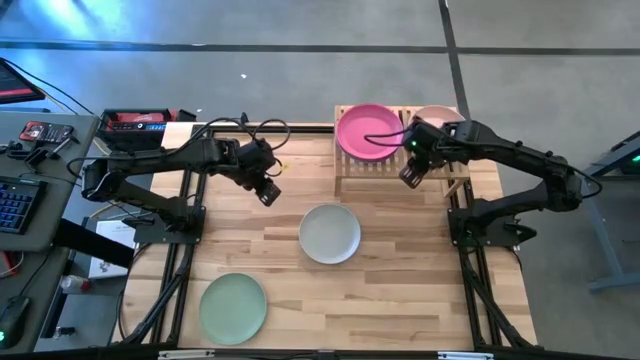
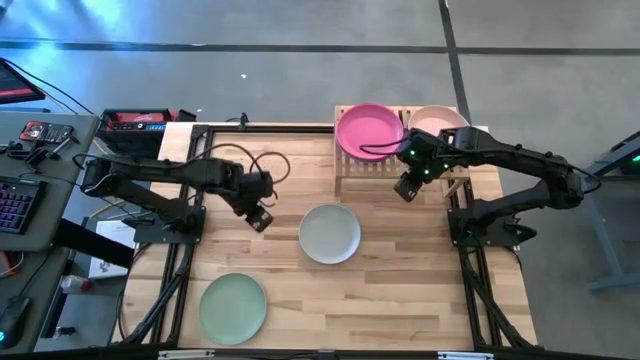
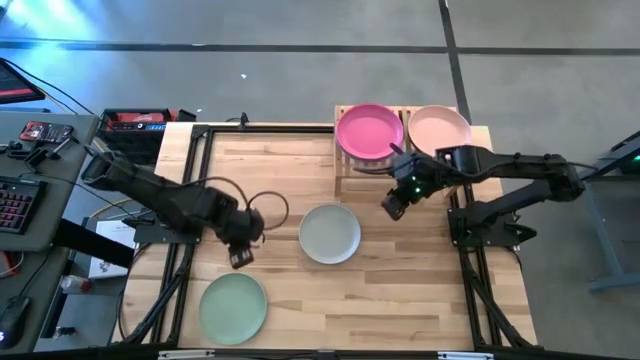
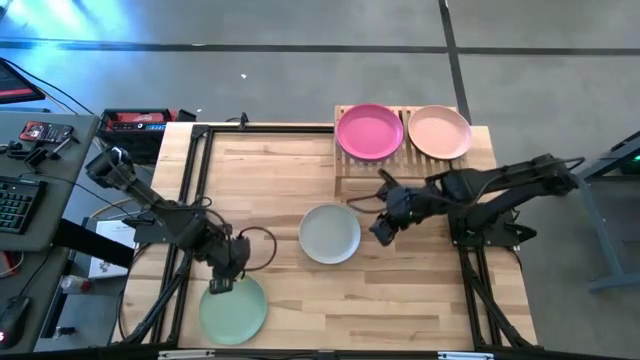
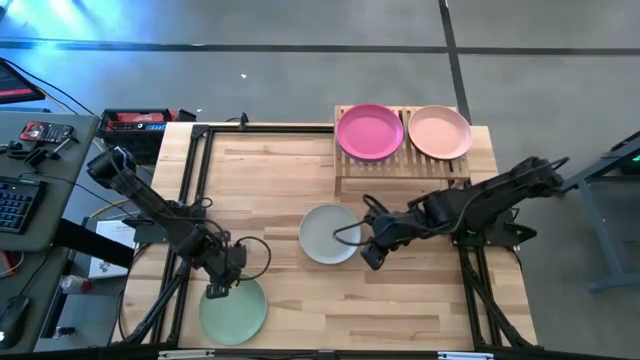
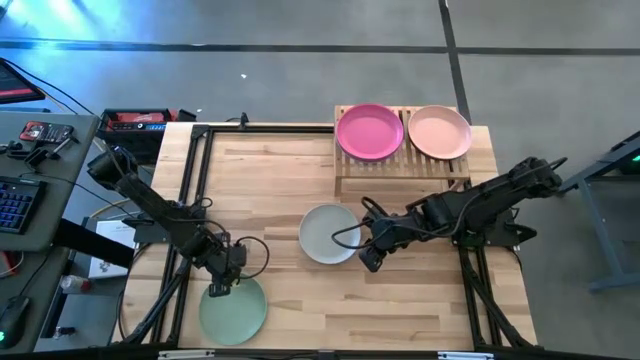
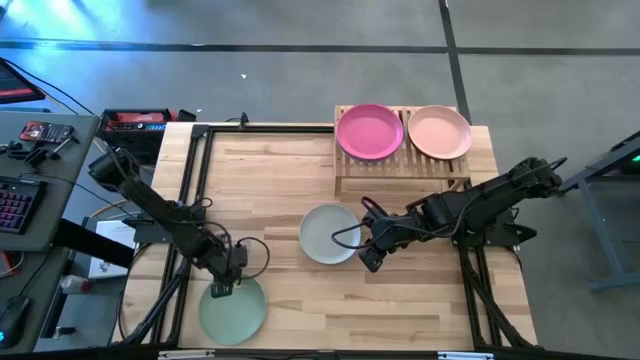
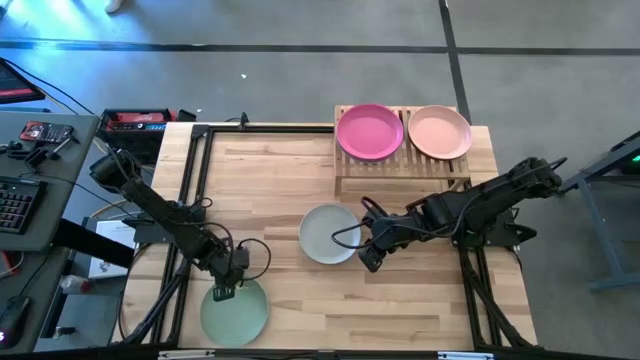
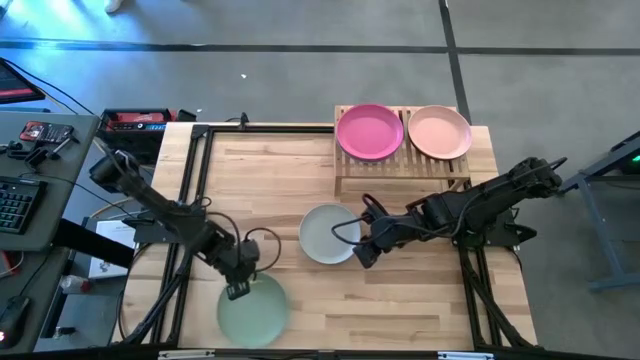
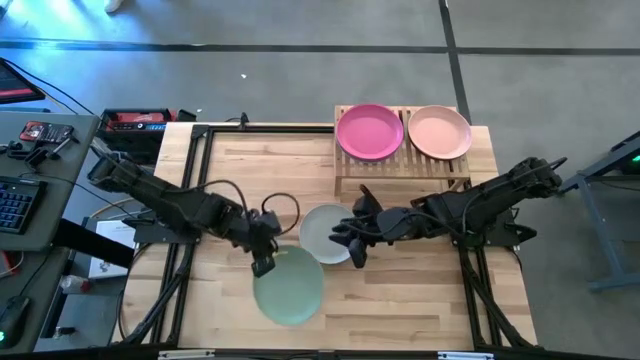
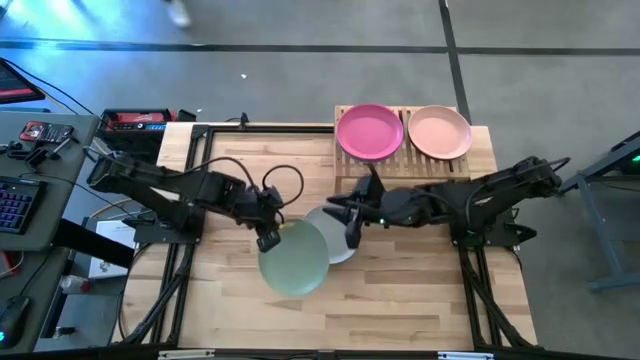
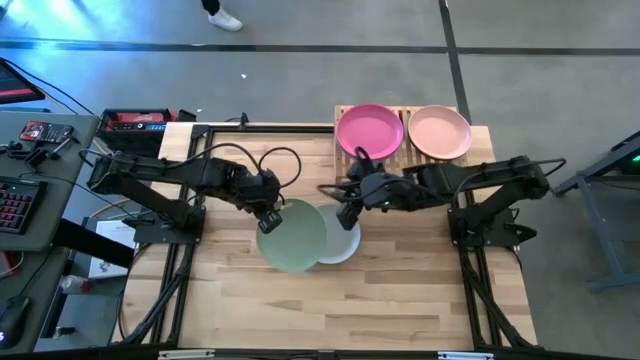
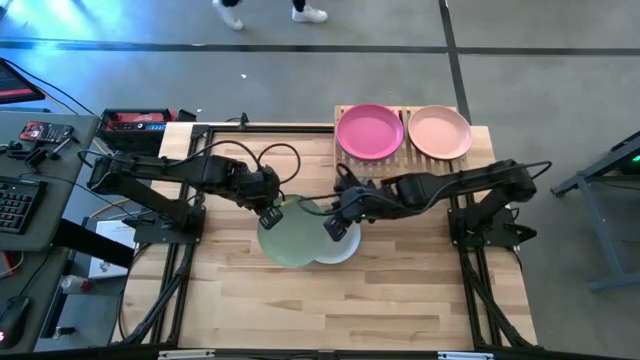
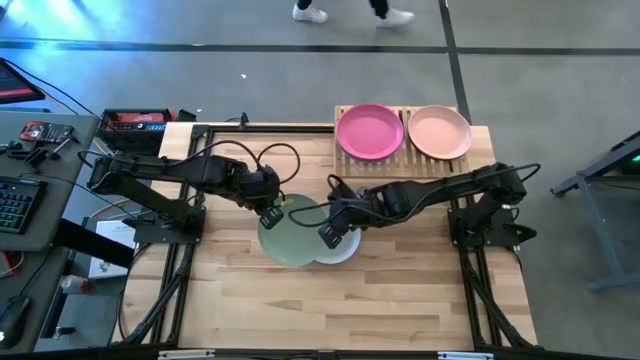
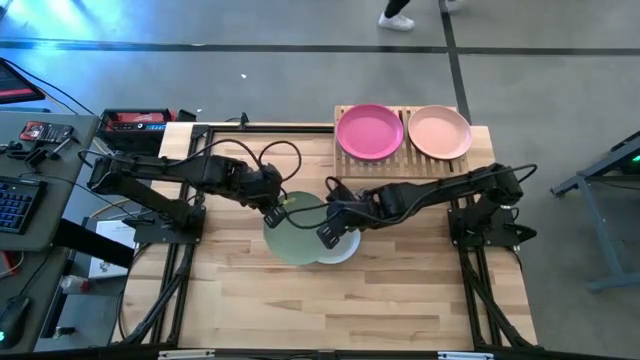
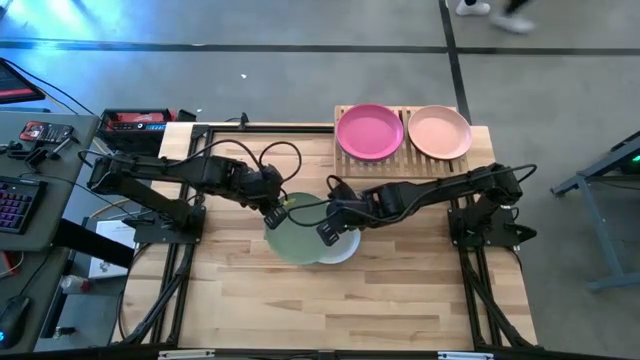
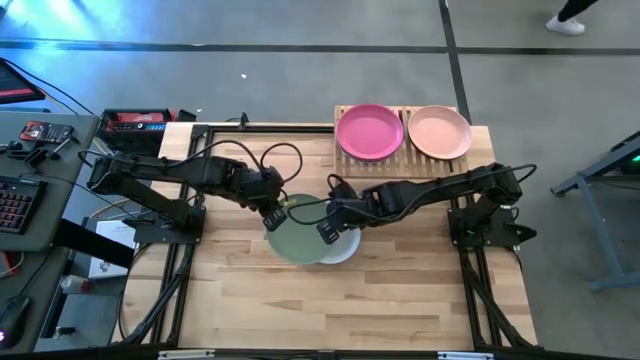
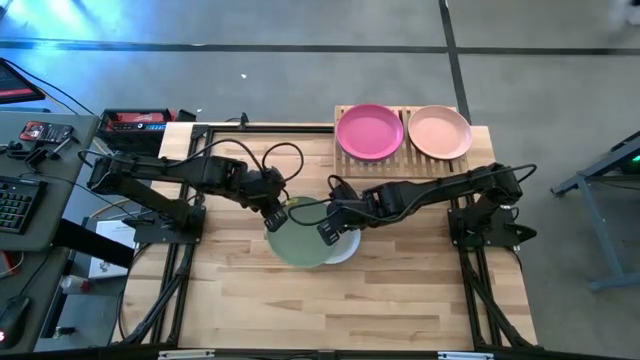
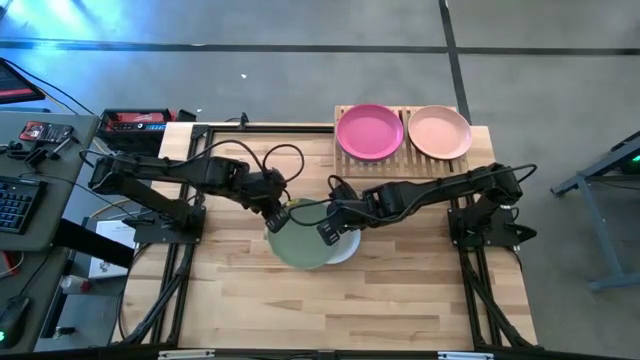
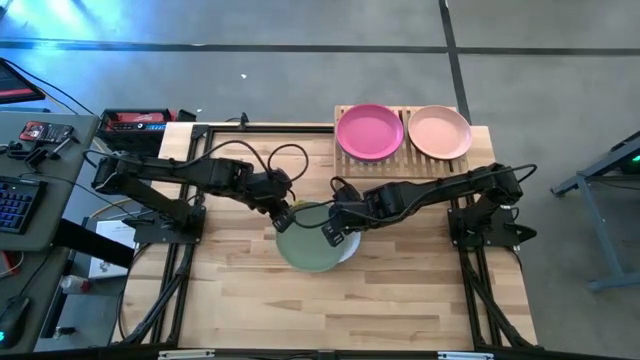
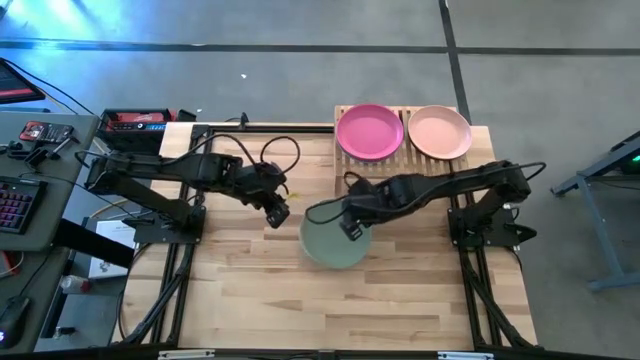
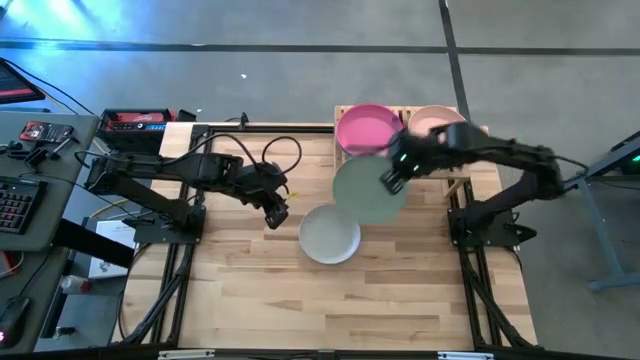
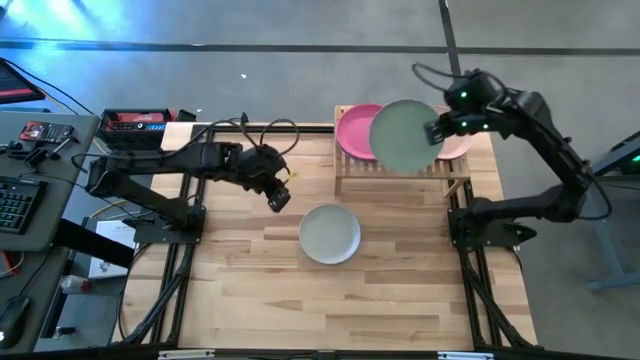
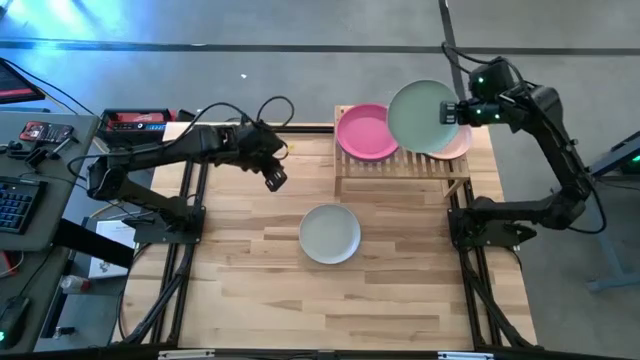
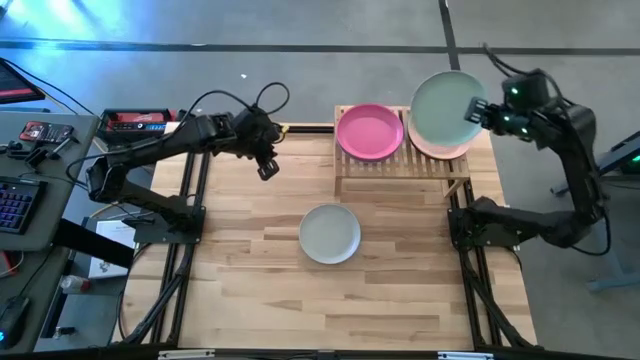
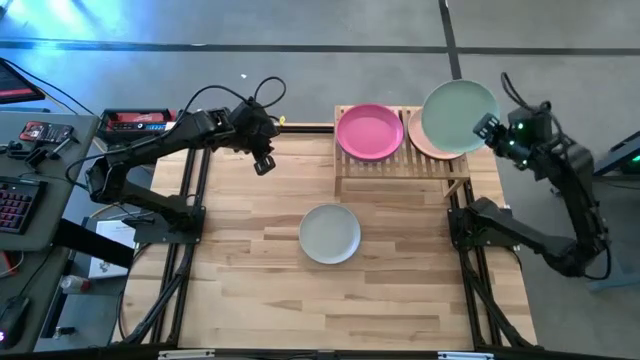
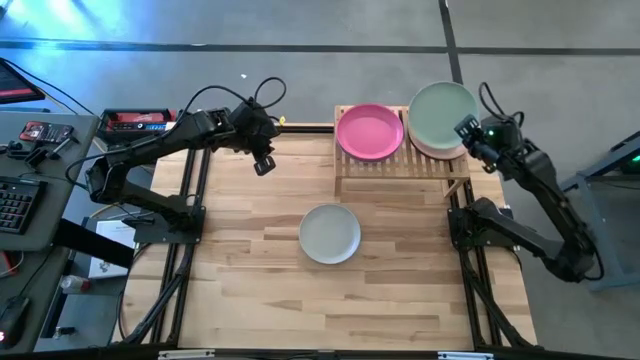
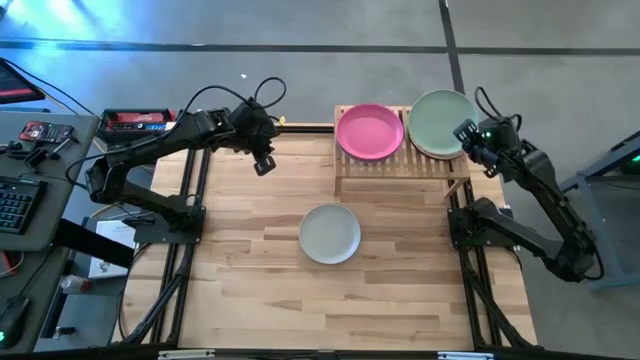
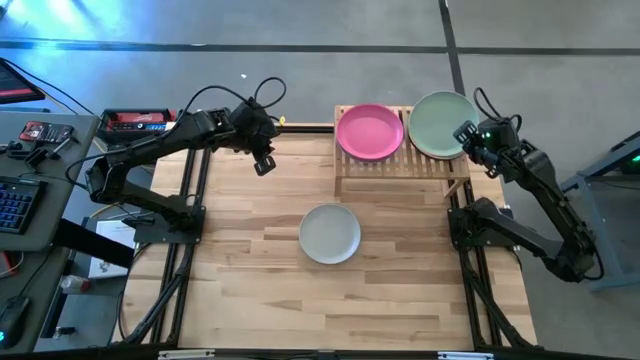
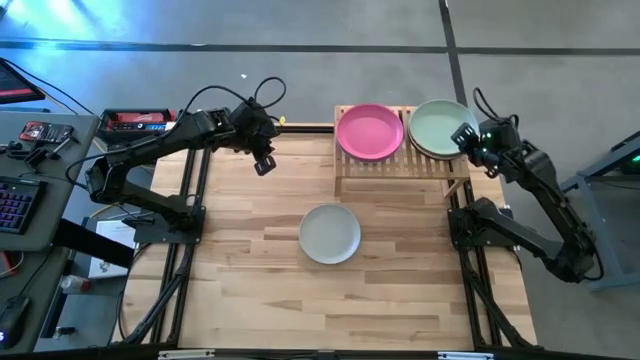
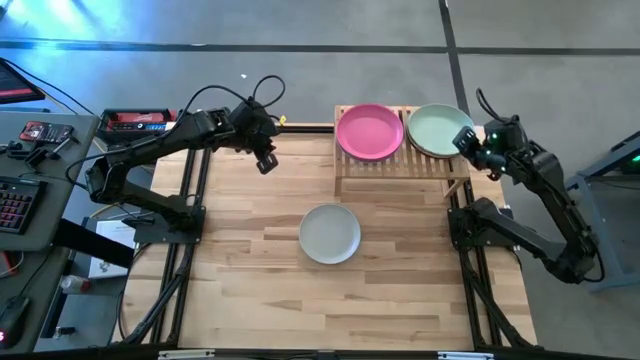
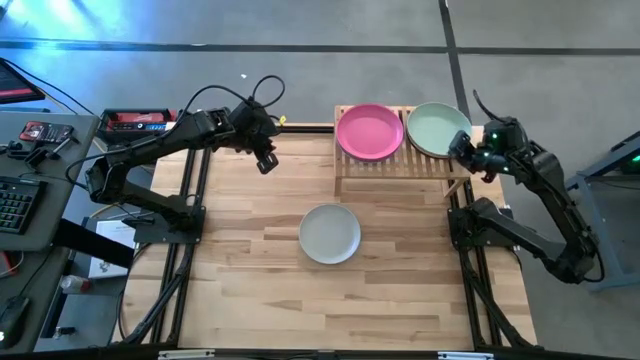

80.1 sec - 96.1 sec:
Task: Place and stack plates onto a shelf
Stack the green plate on top of the brown plate on the shelf

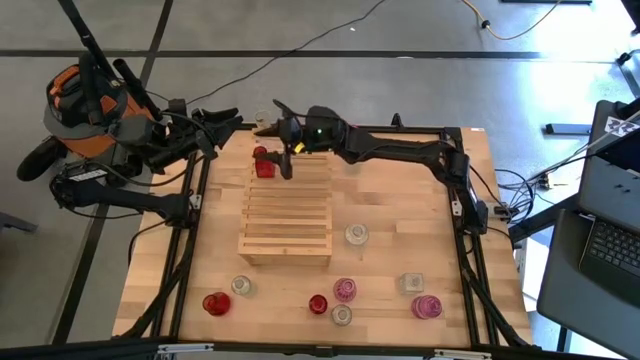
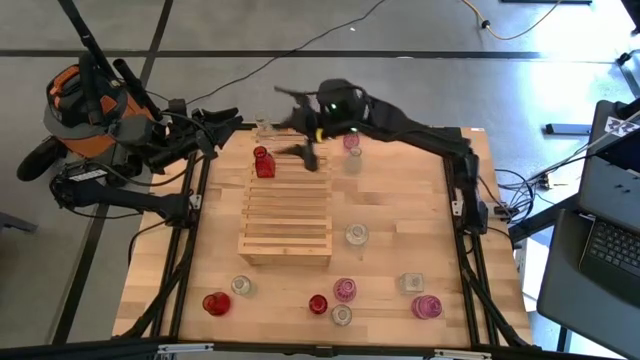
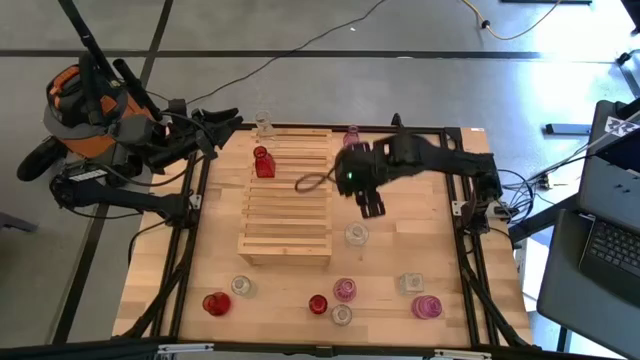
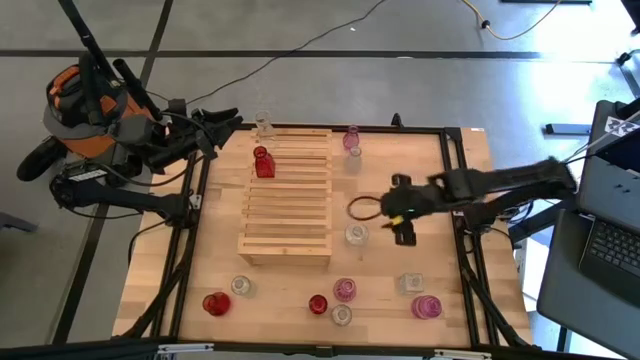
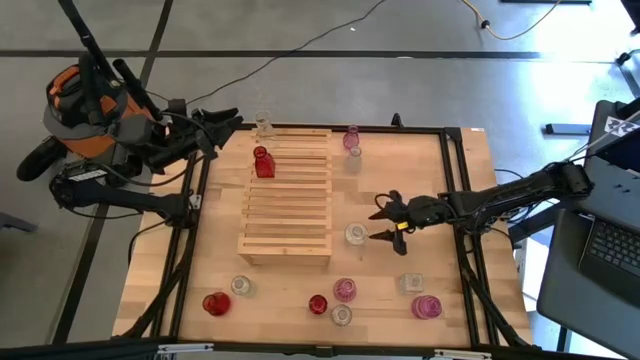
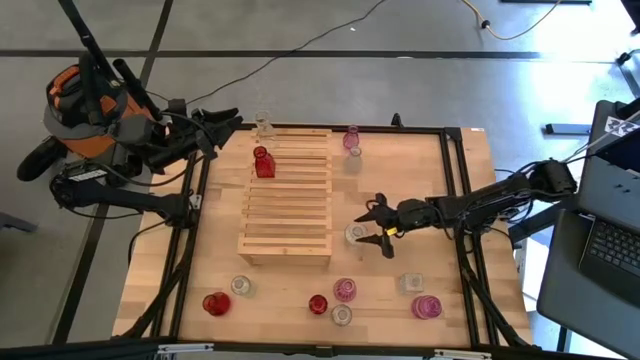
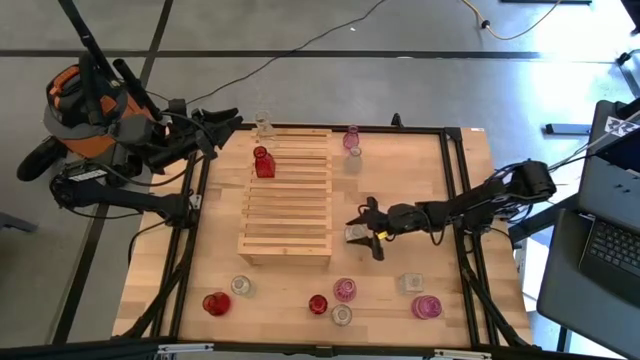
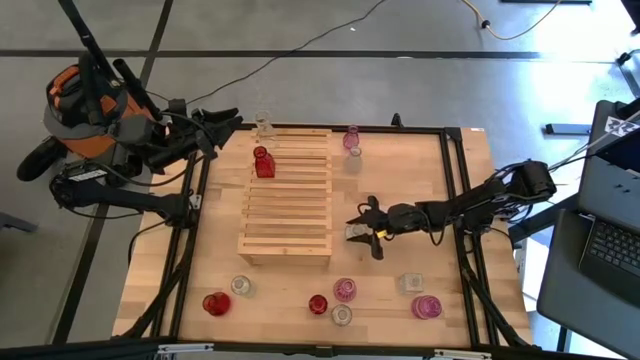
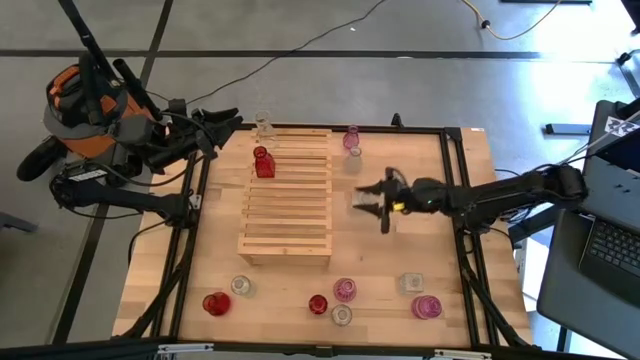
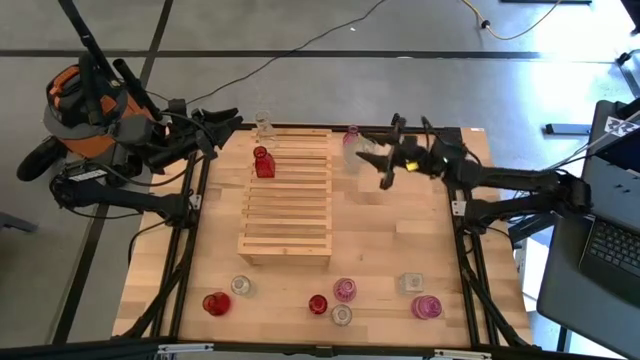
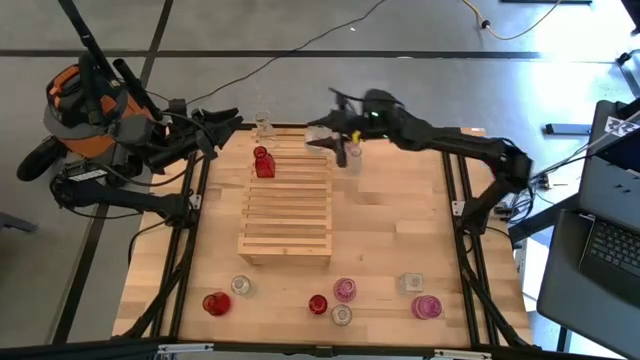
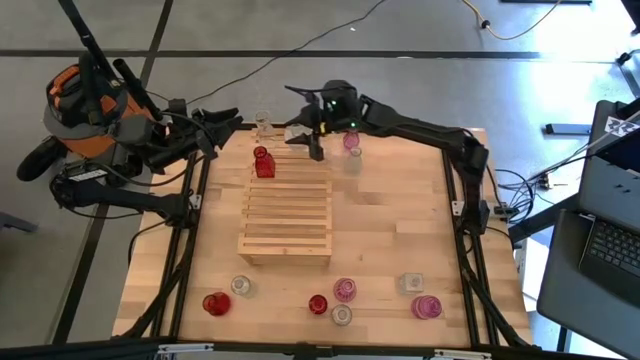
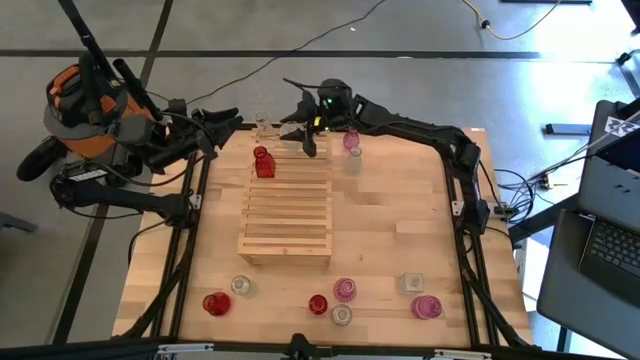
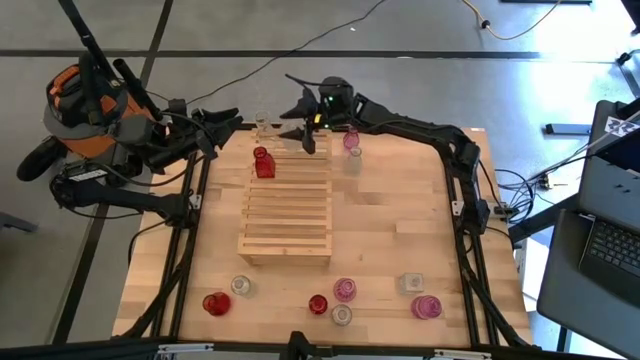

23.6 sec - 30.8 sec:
Task: sort vases onto shelf
Put the transparent vase on the shelf aligned with the other transparent vase
